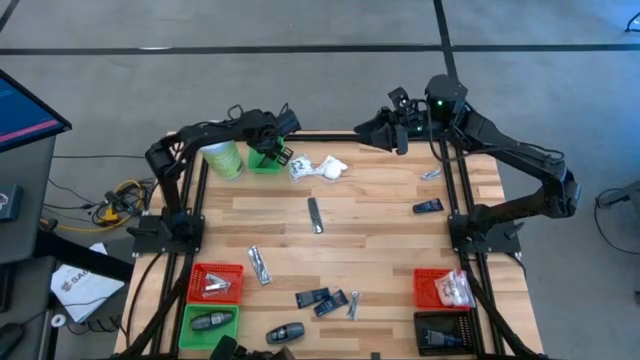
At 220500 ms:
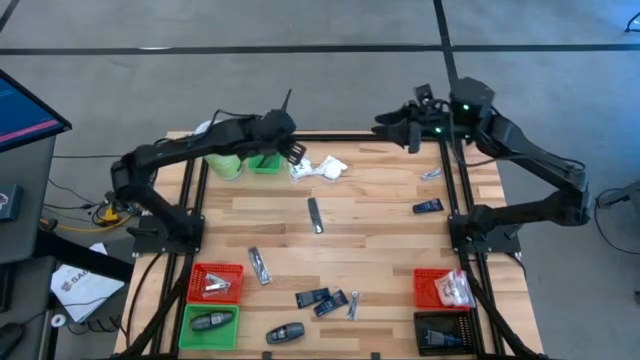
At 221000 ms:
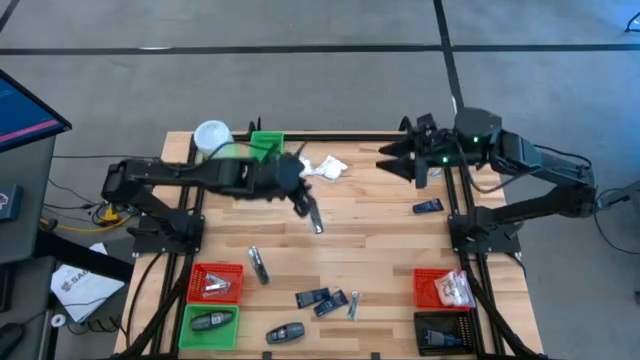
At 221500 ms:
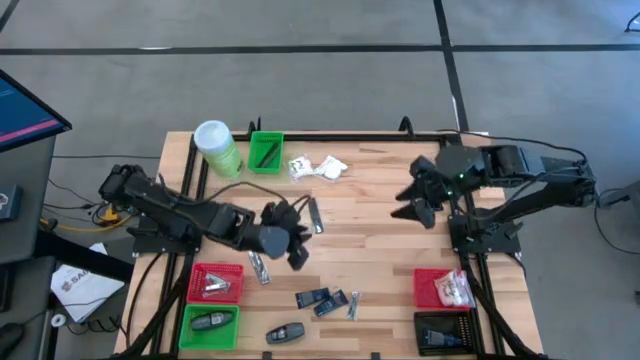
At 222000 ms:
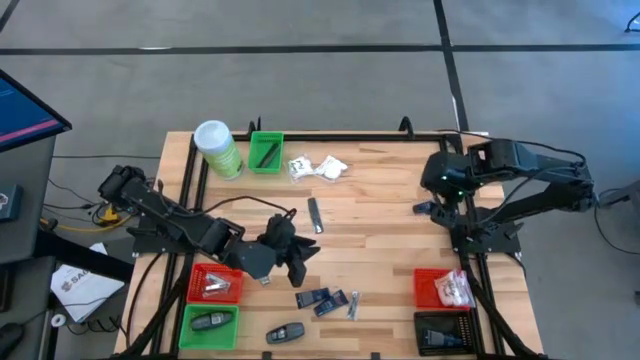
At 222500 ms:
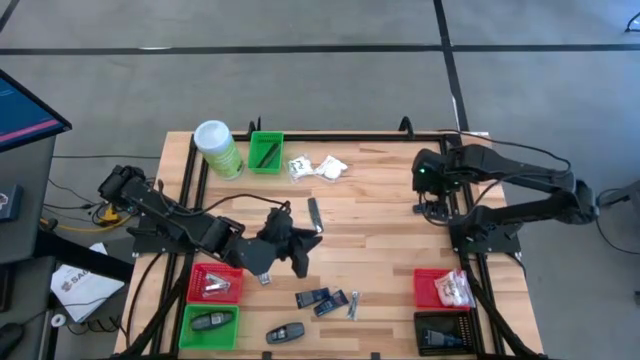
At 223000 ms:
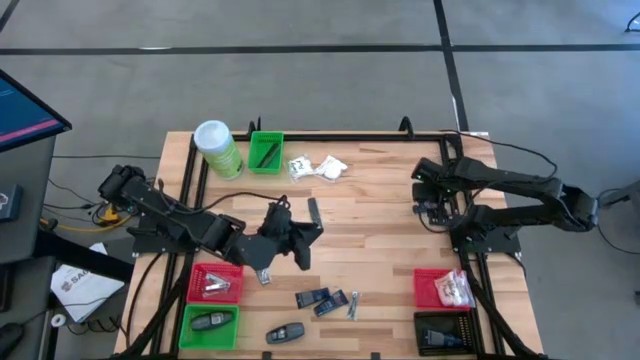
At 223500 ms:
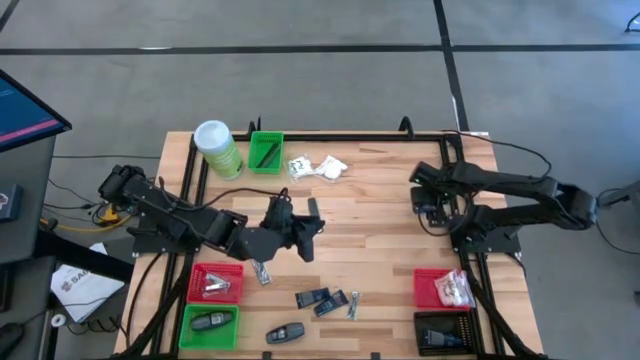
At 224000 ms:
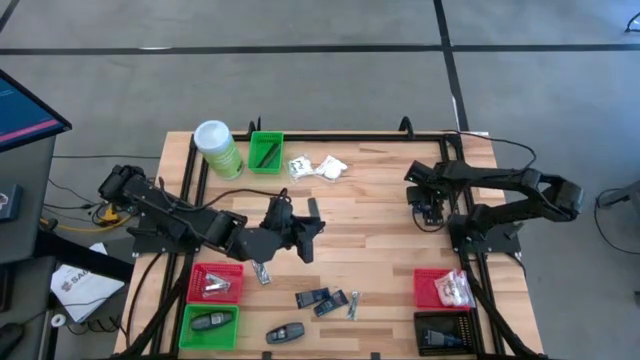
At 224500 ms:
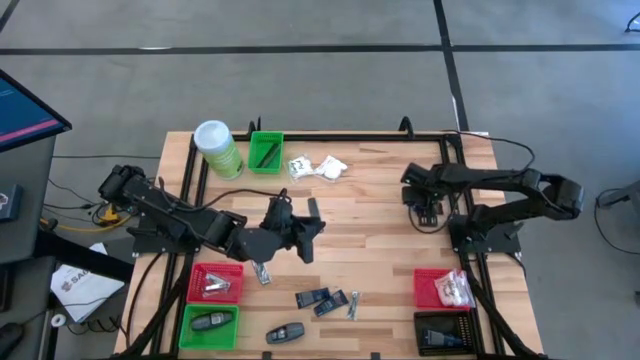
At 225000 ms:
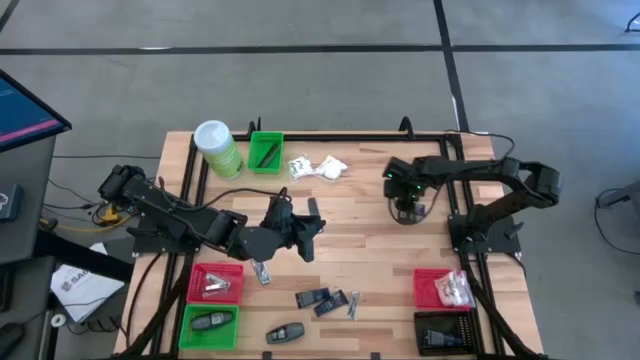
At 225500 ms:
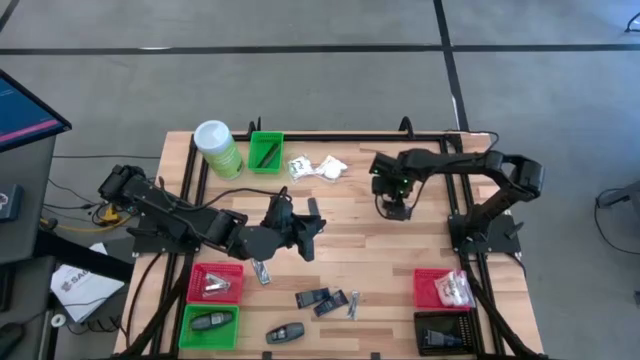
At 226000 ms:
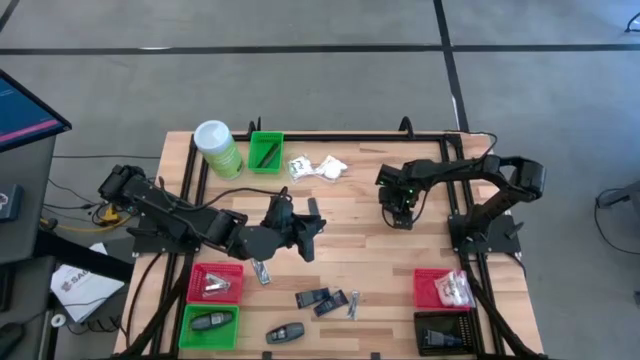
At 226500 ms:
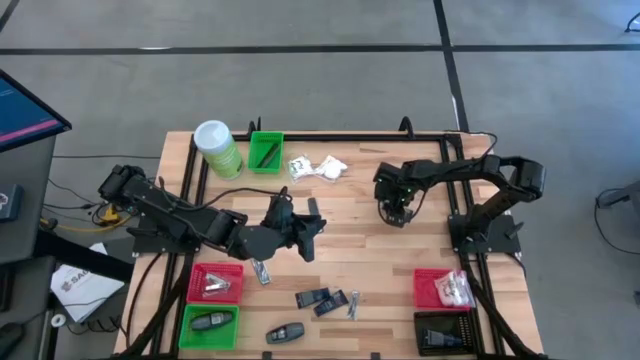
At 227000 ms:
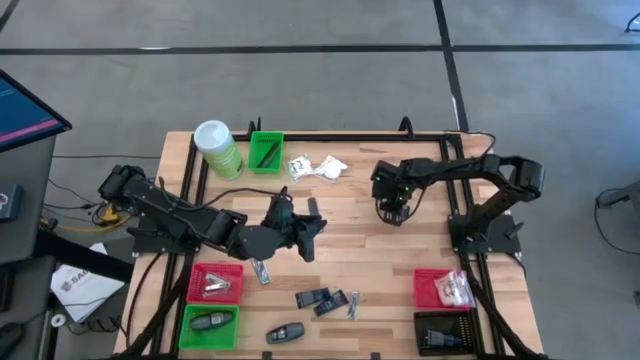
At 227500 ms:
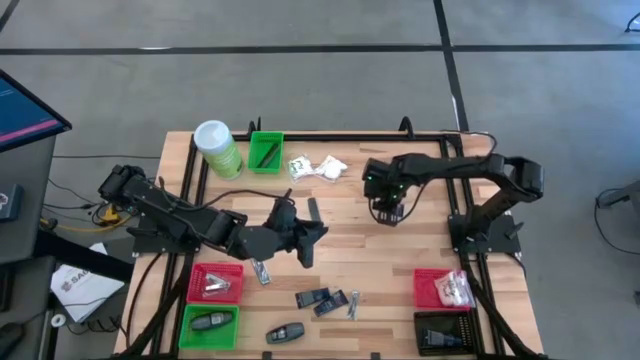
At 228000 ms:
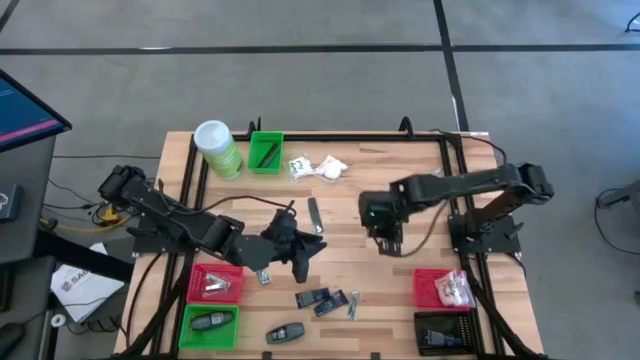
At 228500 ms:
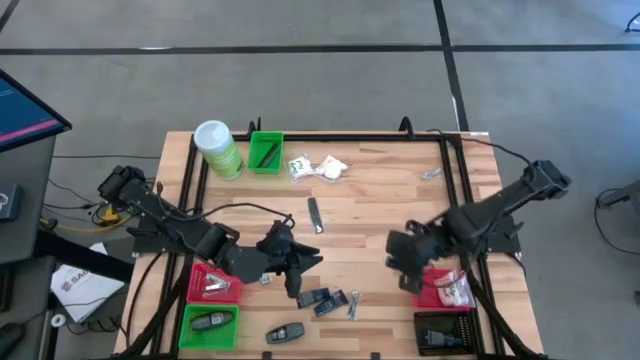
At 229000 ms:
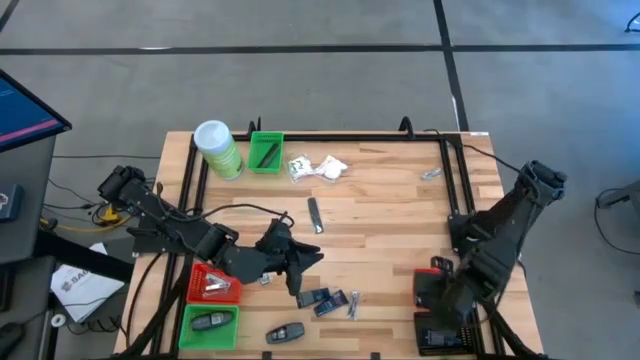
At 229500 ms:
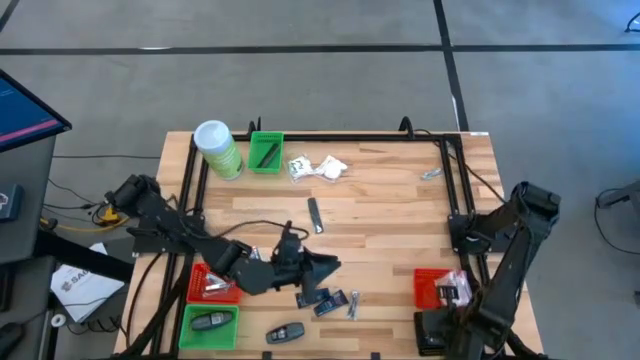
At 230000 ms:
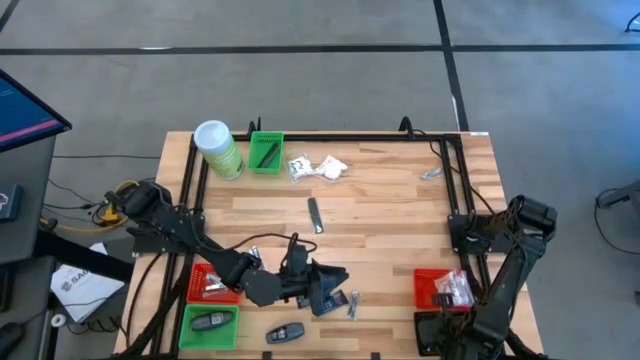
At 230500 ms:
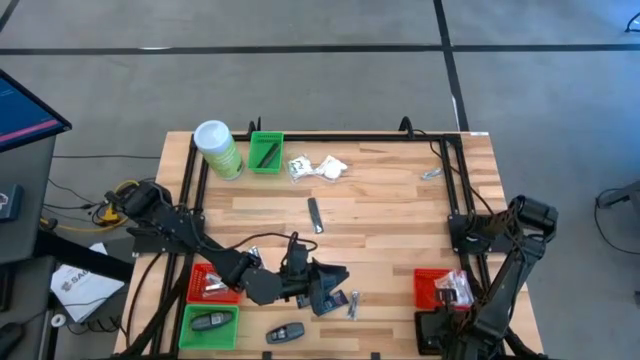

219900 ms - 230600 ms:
Task: Pick & Place Travel size toiletries
Put the shave cream into the black bin

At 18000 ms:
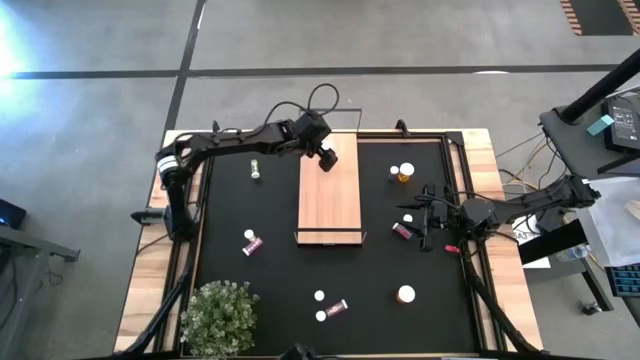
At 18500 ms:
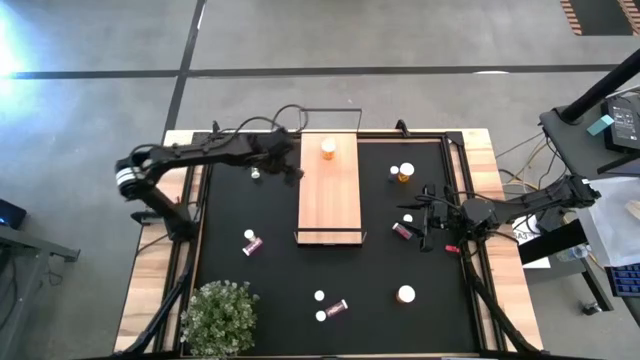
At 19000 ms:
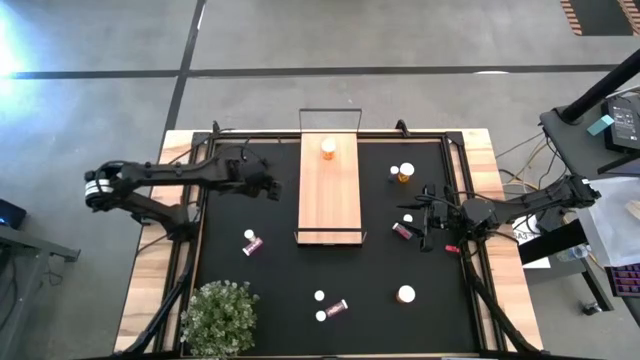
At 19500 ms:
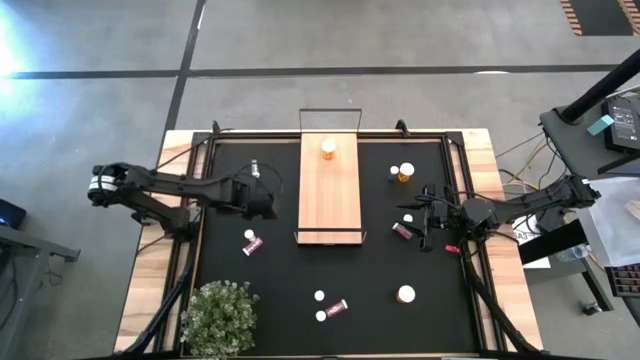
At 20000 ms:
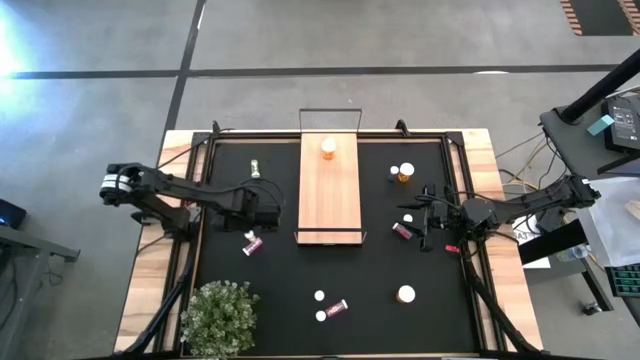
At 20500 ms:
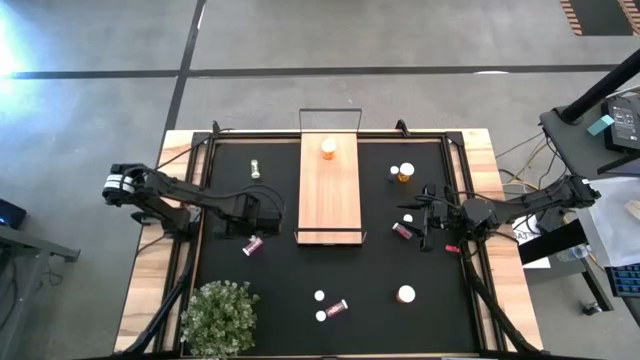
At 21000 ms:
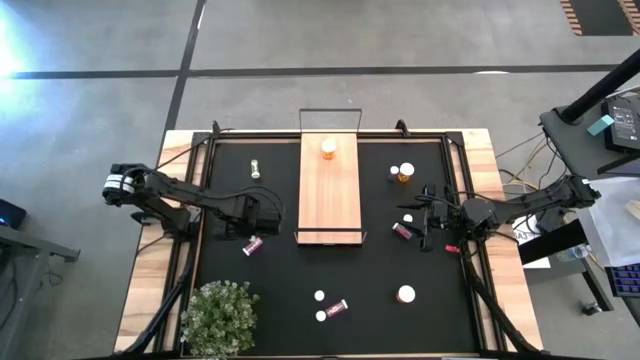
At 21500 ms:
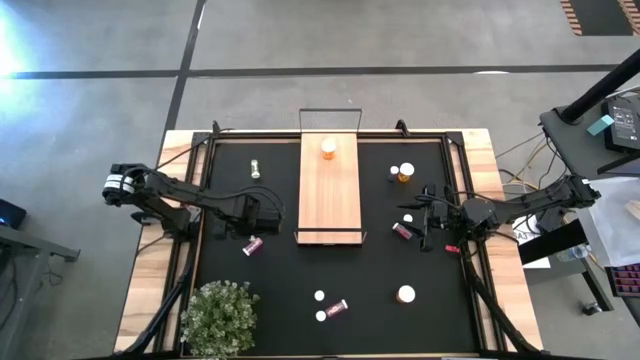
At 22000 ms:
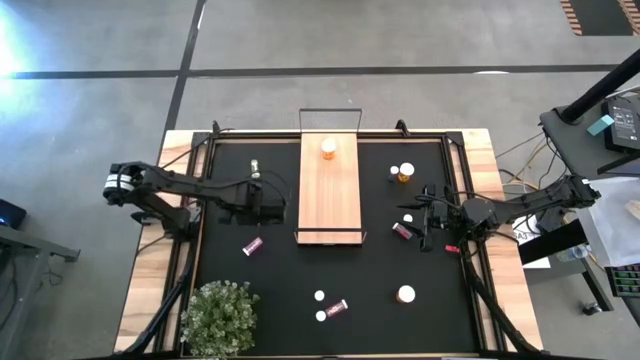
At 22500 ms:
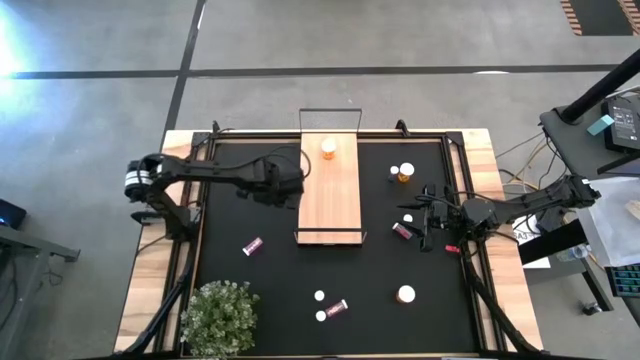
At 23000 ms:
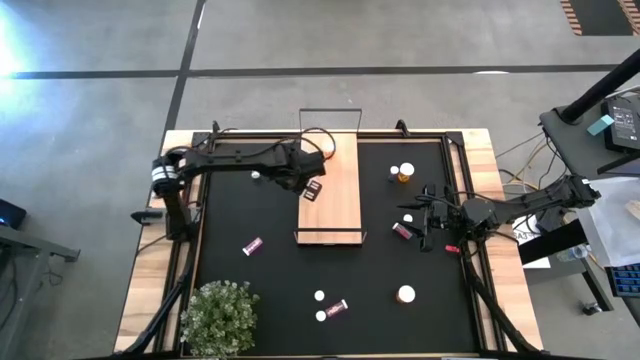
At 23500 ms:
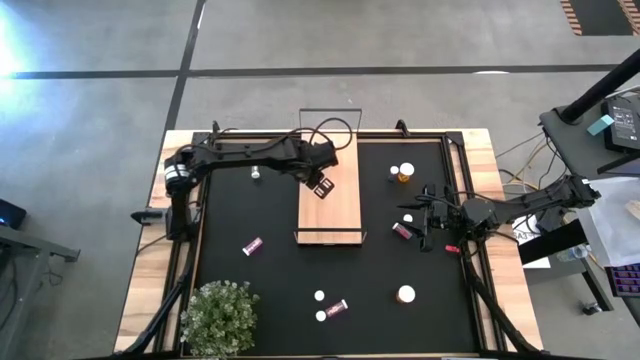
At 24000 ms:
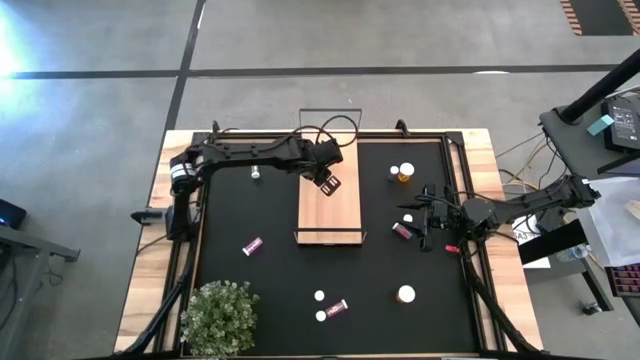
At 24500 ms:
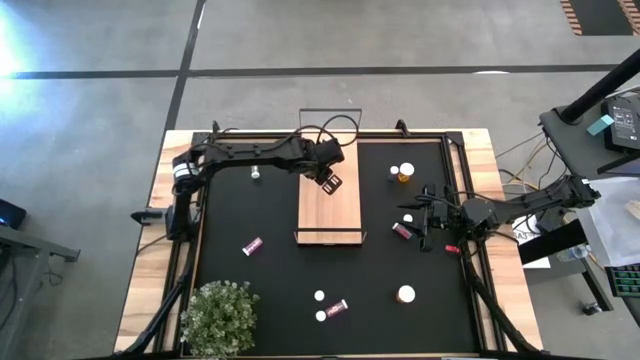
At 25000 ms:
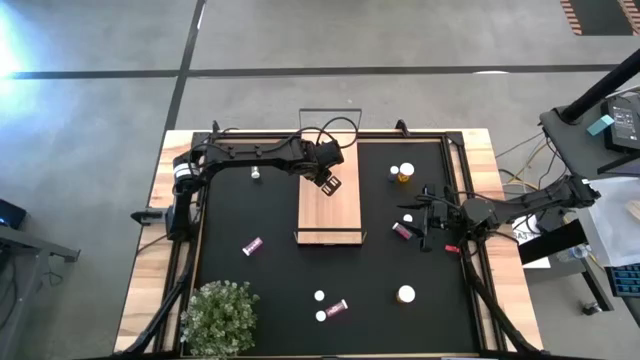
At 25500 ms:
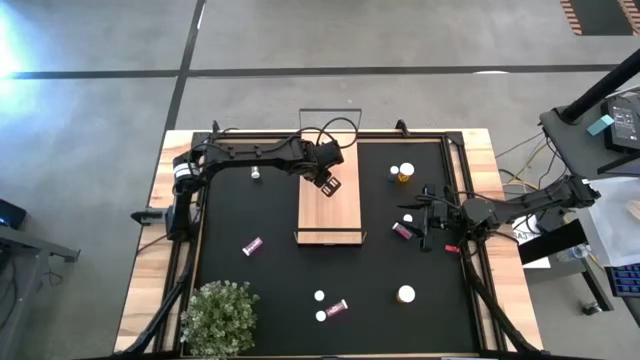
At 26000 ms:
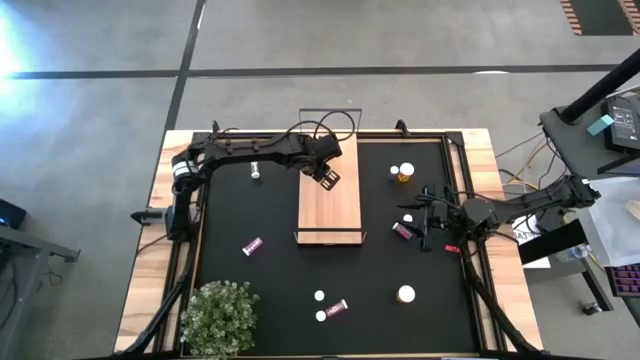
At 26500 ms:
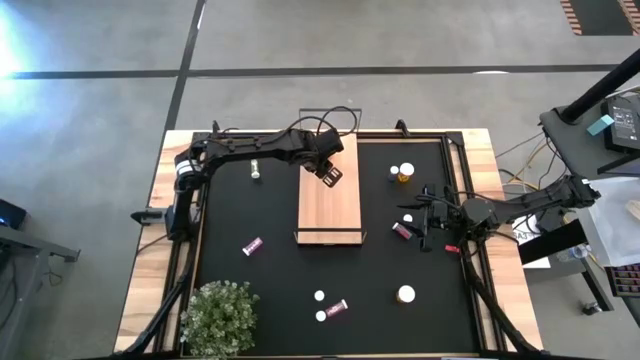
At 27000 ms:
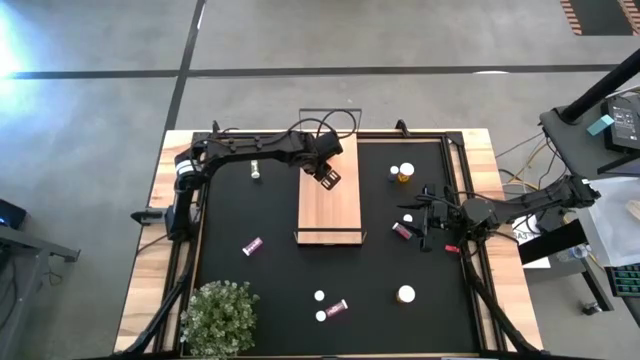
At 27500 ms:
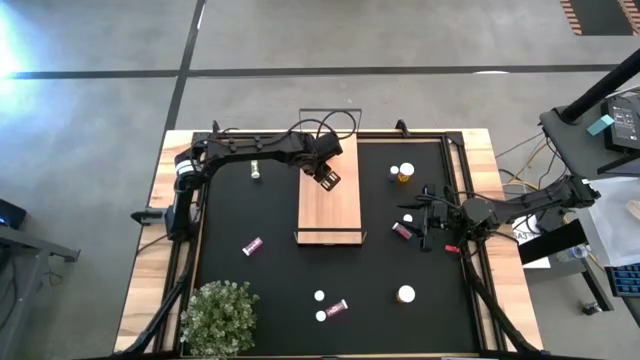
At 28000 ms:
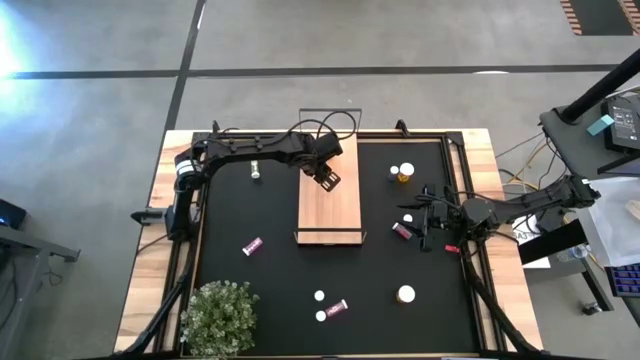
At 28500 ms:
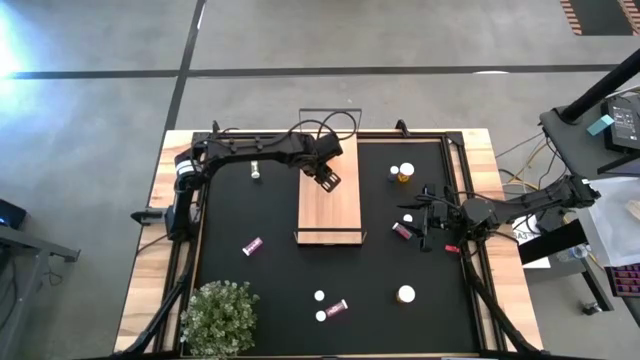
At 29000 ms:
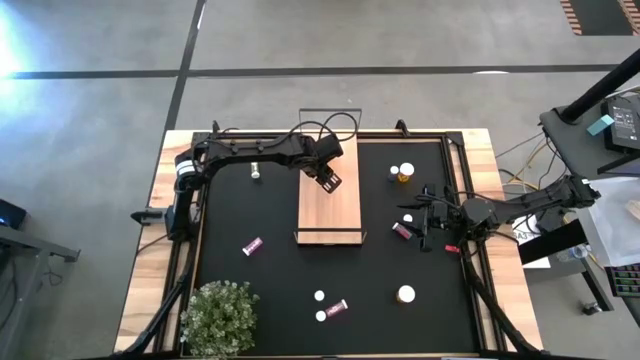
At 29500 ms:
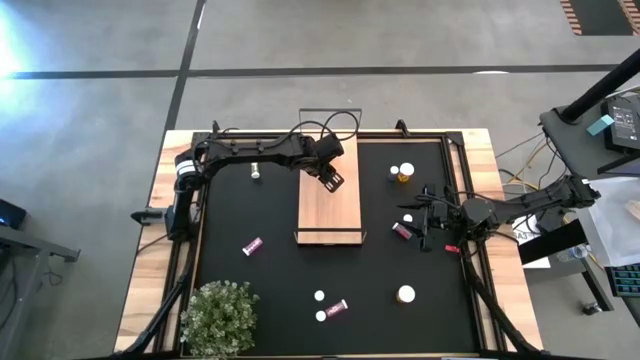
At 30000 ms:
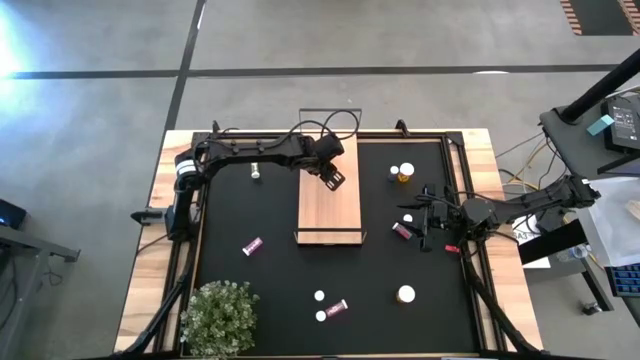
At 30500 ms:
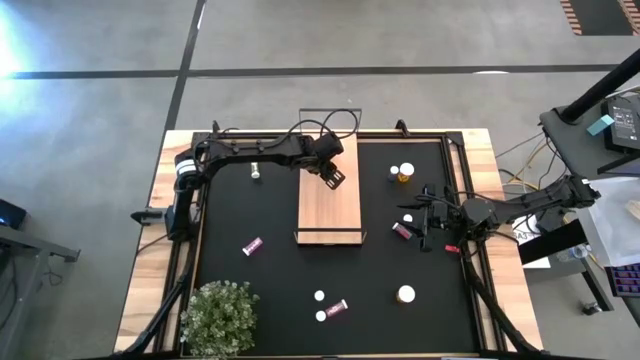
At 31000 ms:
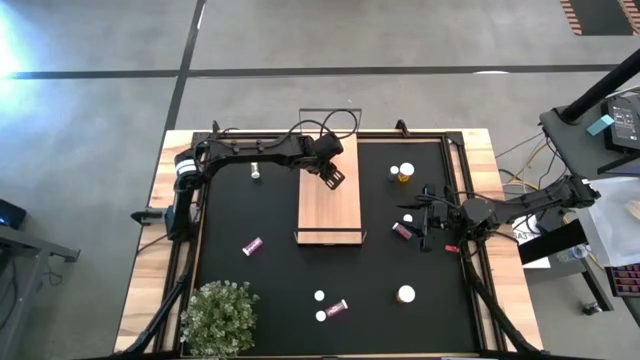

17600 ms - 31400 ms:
Task: Pick and place medicine bottles onto shelf by color
Put the middle left yellow medicine bottle on the shelf
